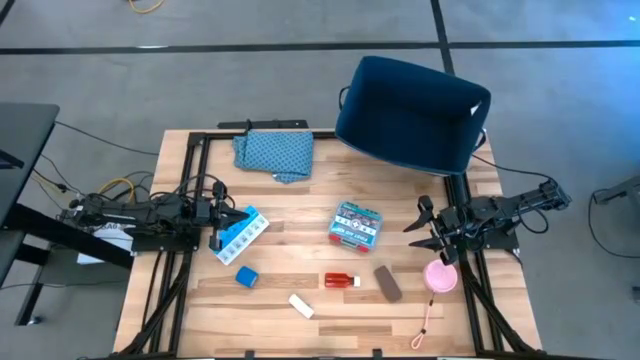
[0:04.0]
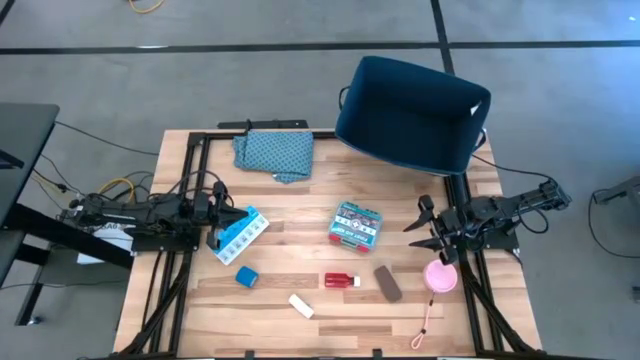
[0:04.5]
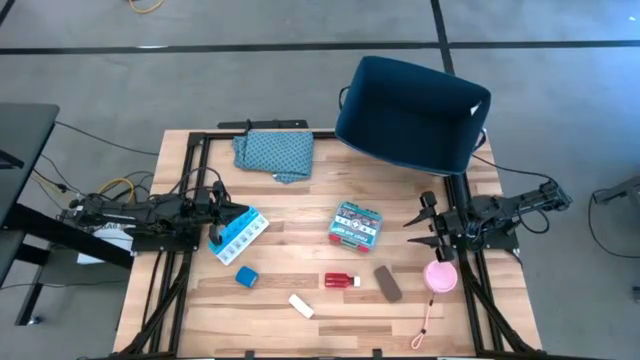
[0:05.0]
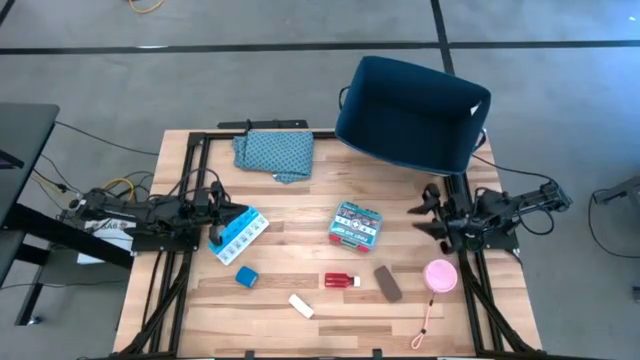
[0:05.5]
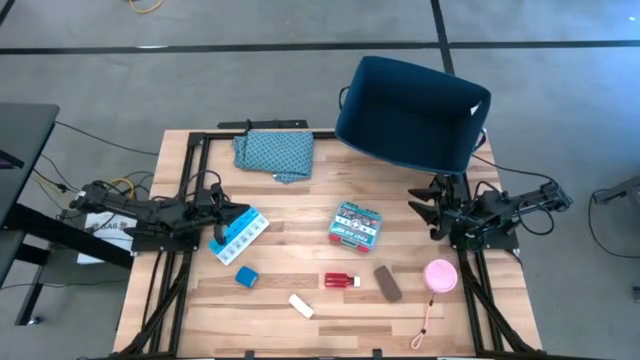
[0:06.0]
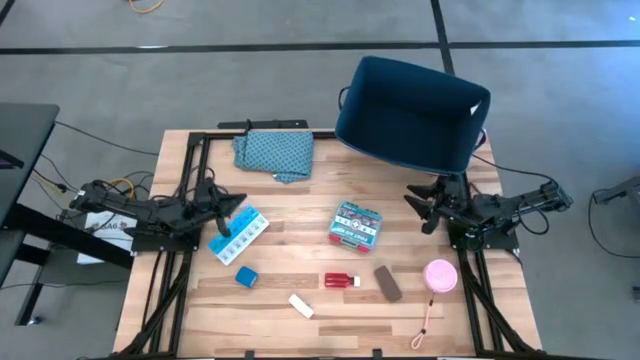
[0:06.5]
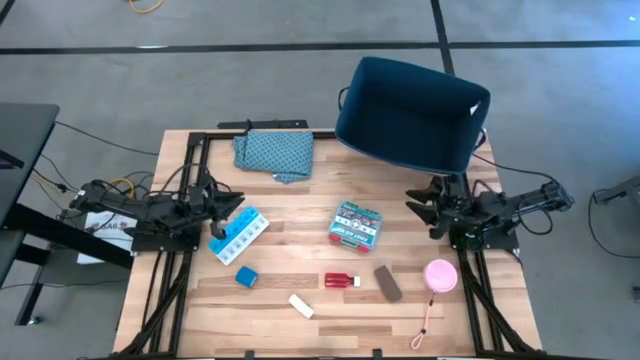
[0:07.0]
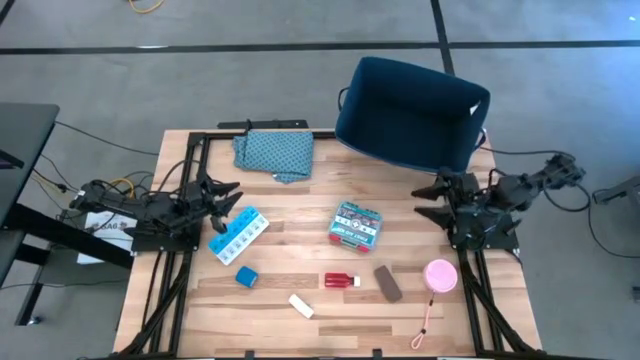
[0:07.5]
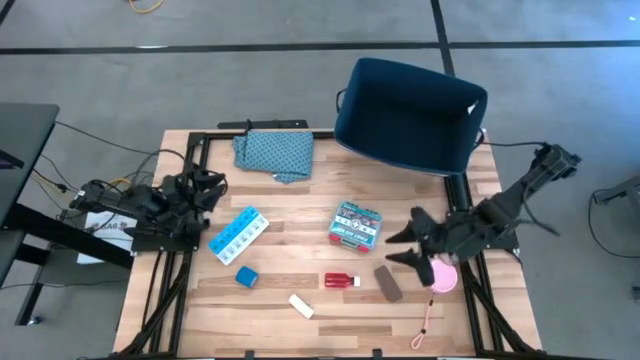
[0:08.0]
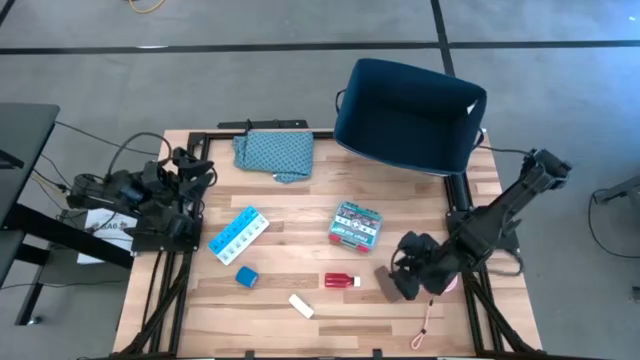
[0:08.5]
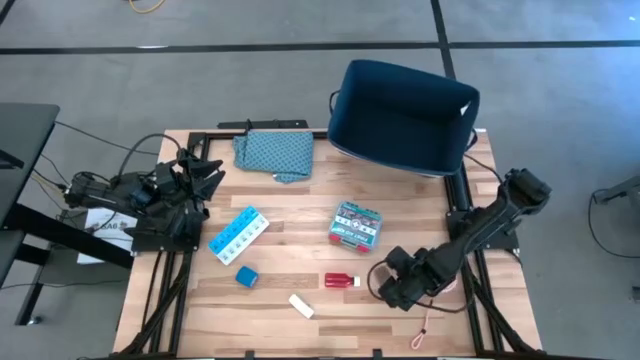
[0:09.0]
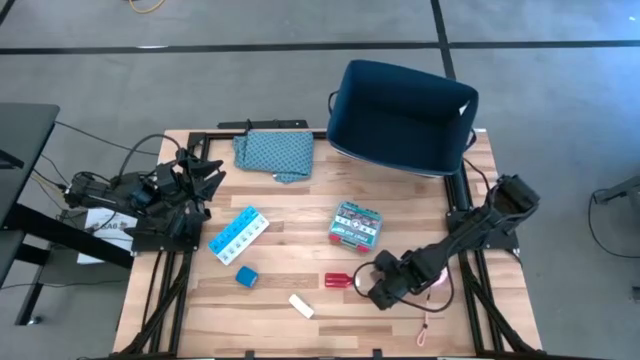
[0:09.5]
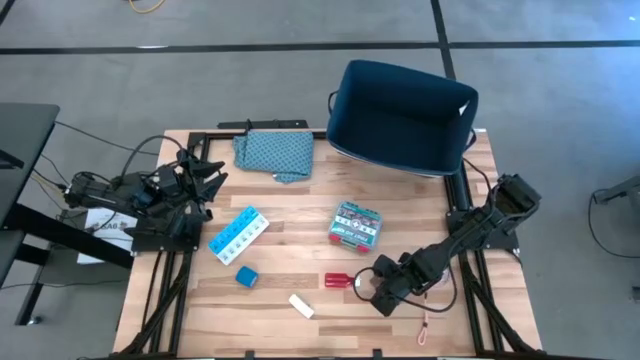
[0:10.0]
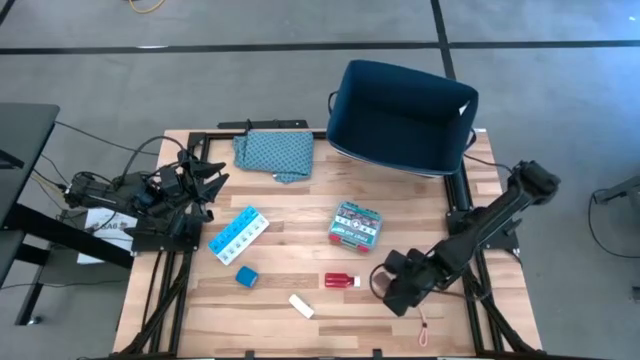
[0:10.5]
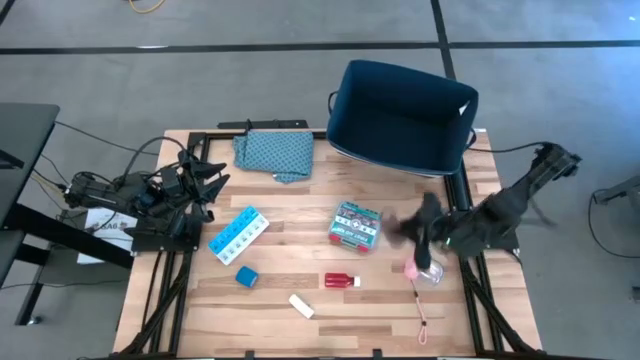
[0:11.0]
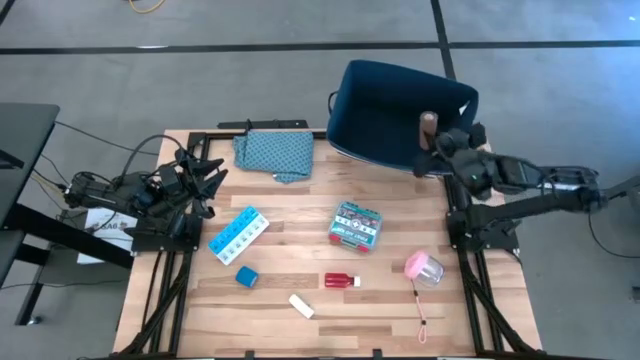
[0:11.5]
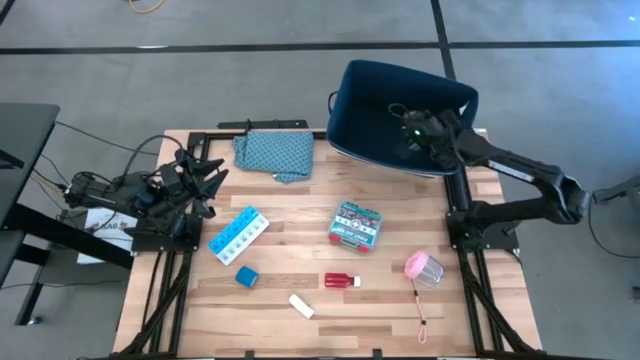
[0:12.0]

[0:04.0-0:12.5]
Task: Pick & place medical supplies in basket/bin
Put the brown bandage into the blue basket

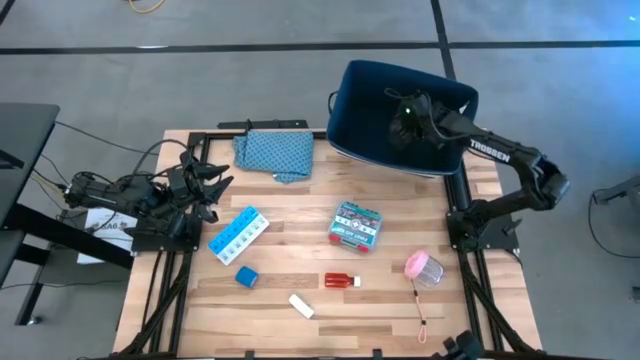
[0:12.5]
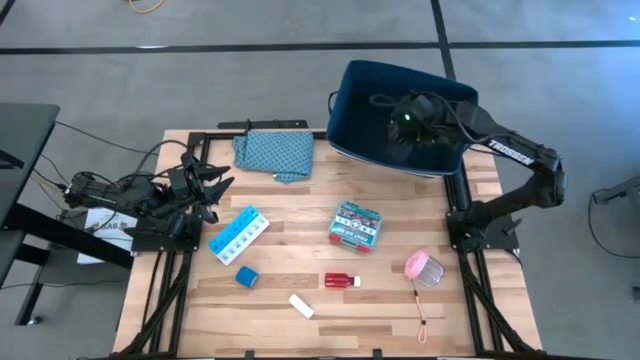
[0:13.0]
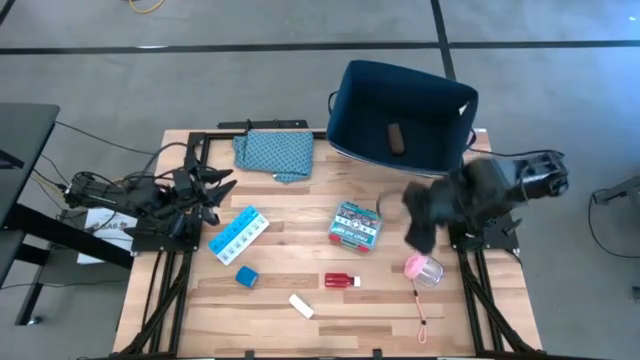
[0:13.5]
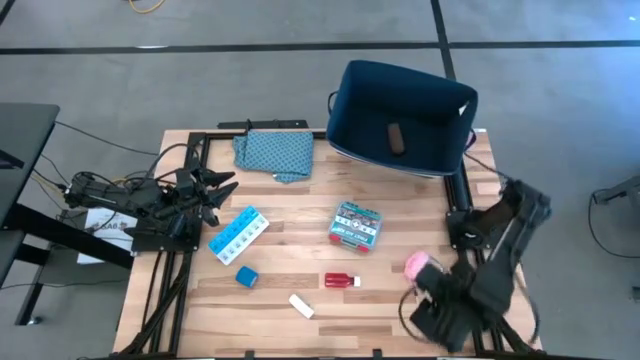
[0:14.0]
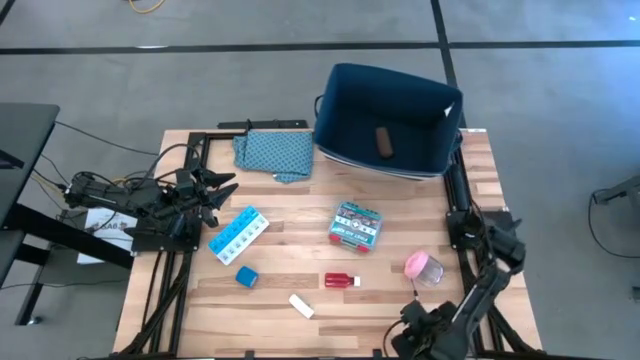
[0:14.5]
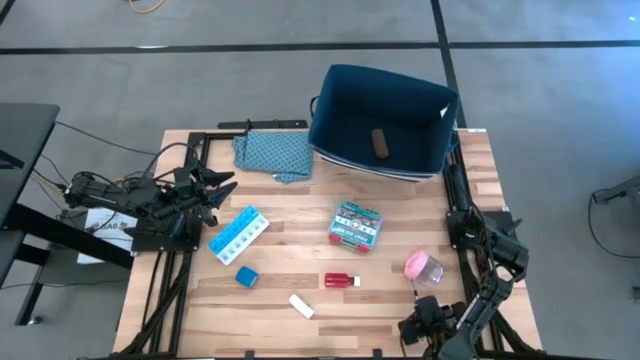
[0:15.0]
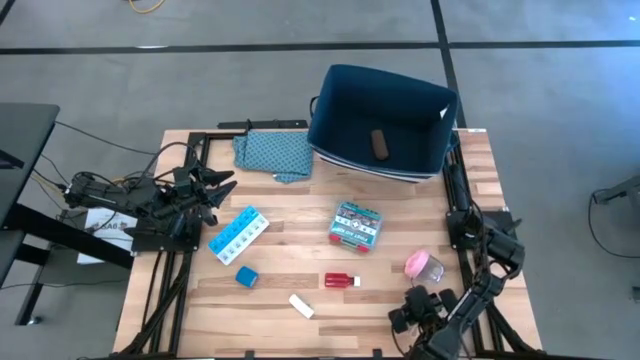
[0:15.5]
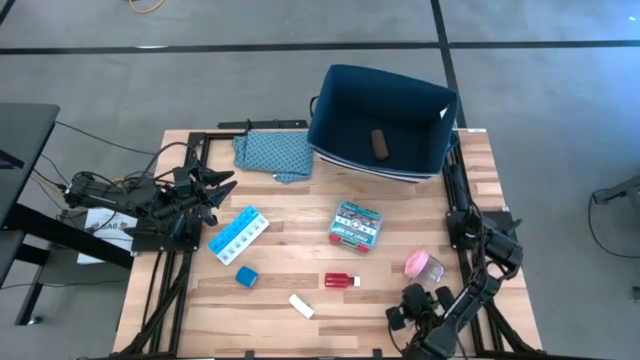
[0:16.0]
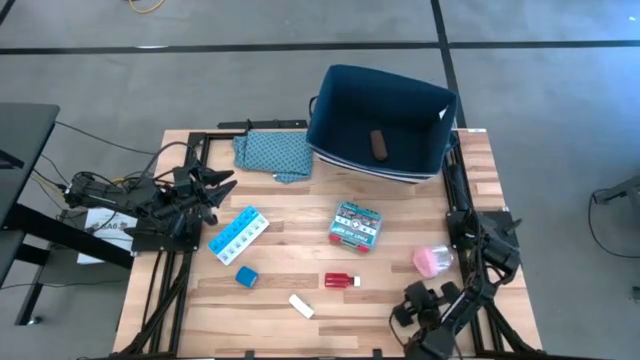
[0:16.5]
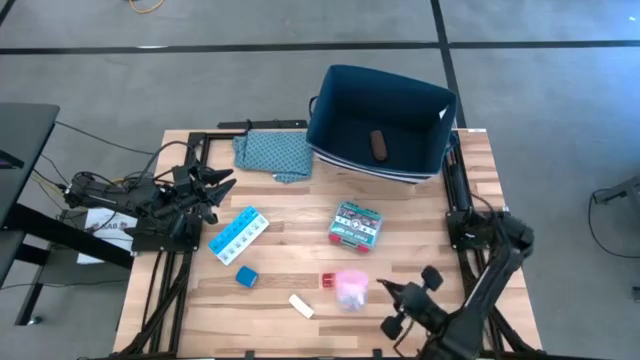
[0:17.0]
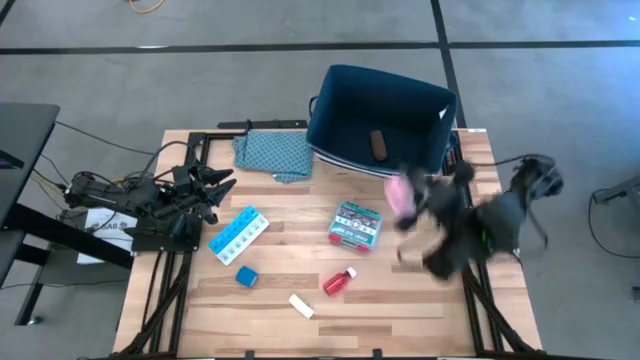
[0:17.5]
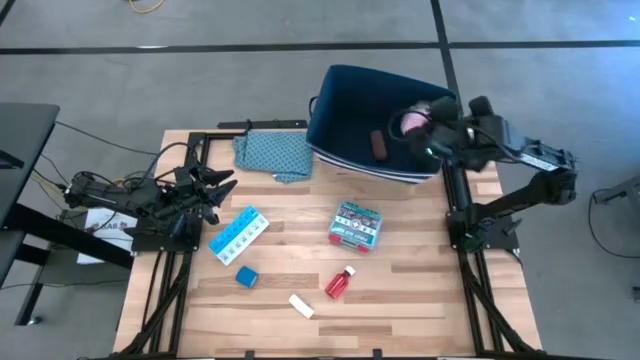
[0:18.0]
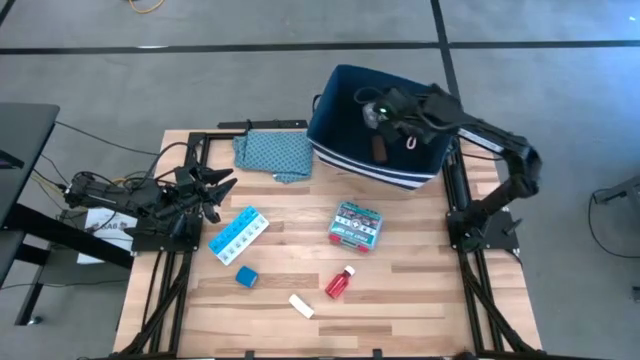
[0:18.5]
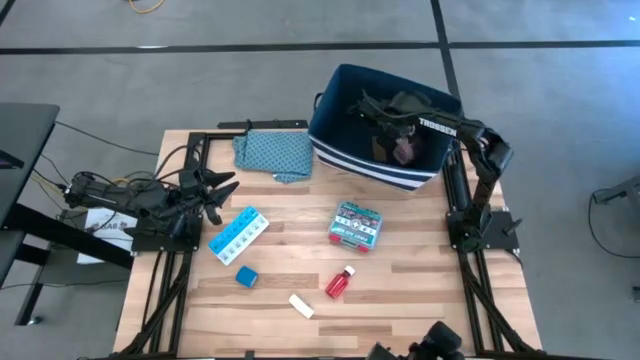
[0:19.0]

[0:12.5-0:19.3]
Put the pink tumbler into the blue basket

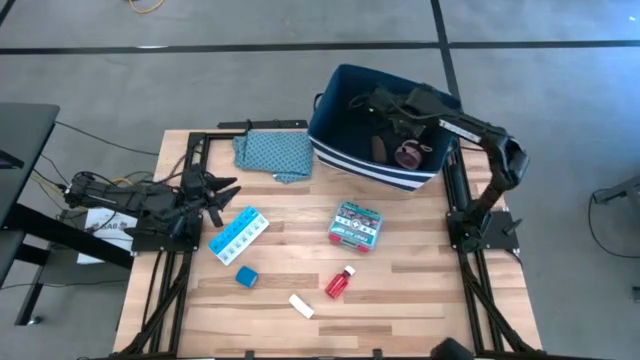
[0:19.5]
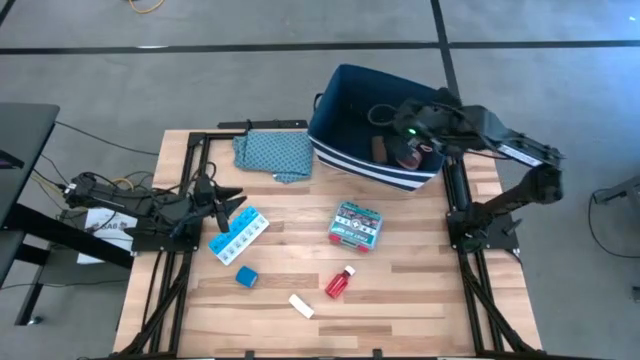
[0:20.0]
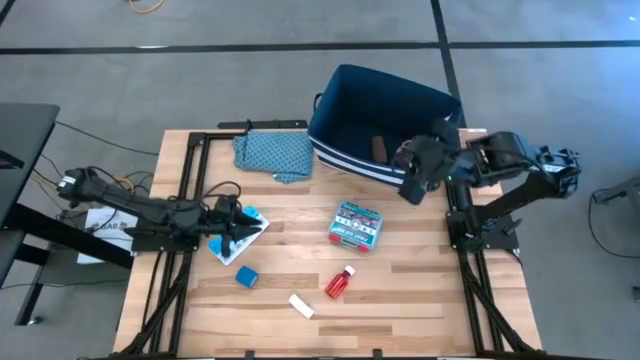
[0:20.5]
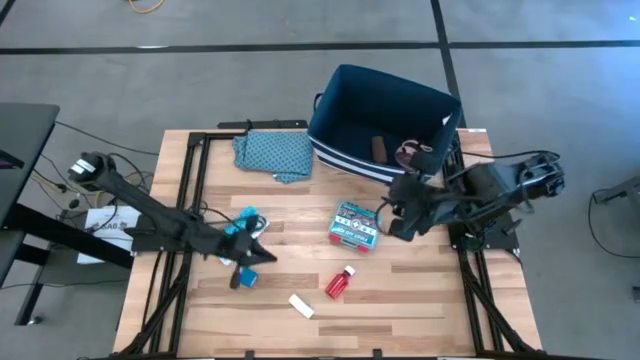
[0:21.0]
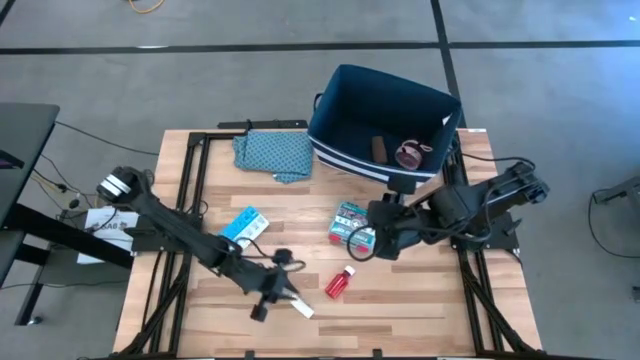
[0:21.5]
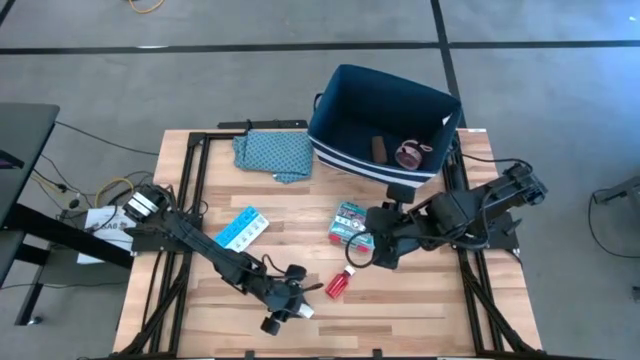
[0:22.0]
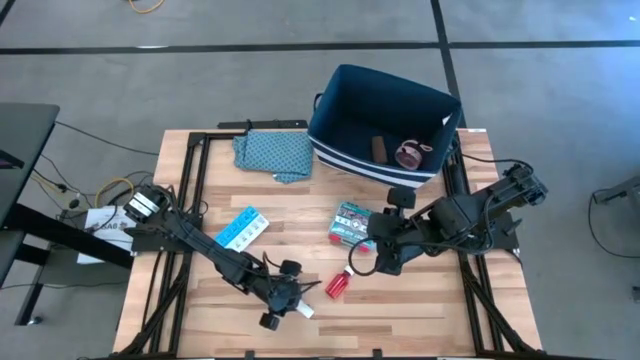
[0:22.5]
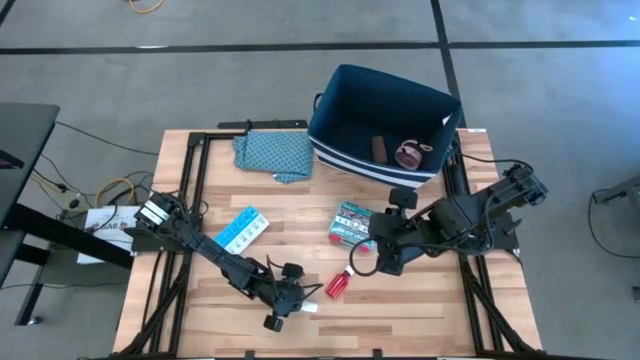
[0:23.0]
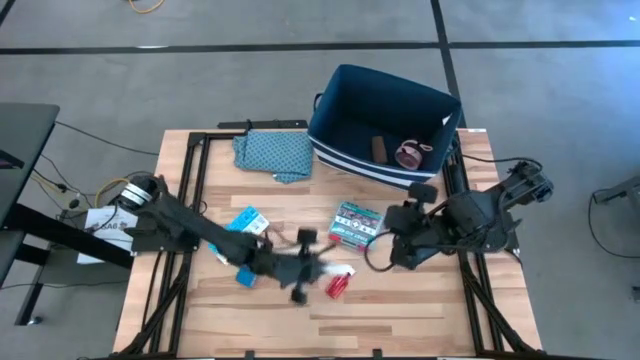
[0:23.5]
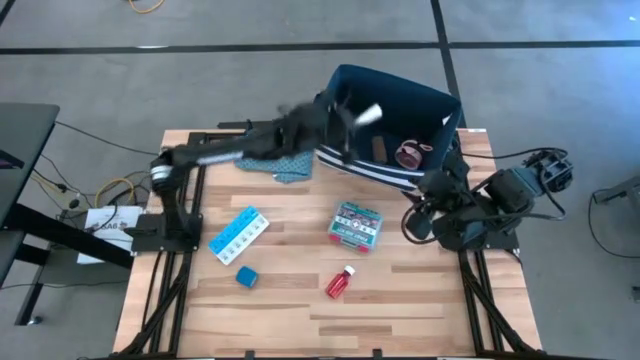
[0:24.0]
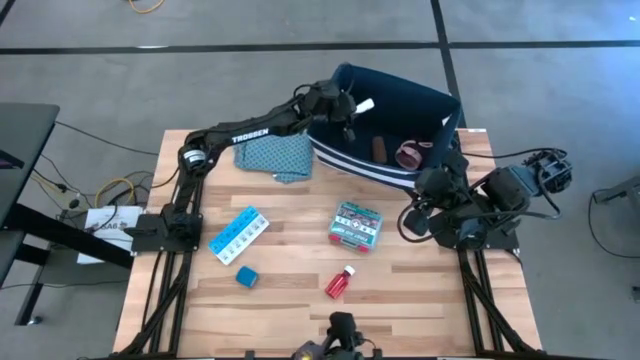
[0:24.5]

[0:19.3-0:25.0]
Put the white rolled gauze into the blue basket
